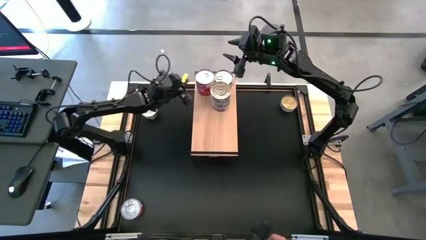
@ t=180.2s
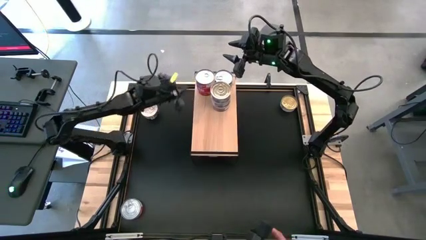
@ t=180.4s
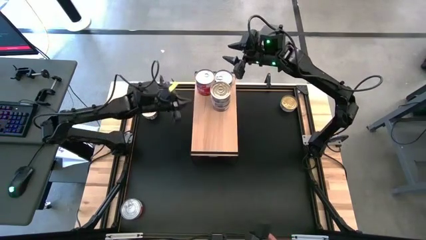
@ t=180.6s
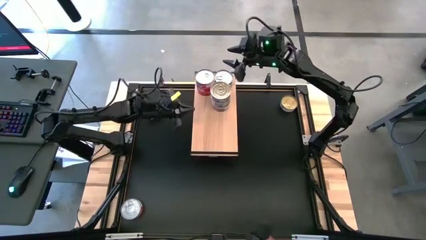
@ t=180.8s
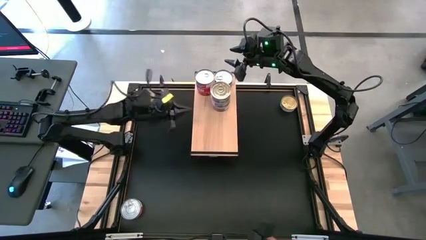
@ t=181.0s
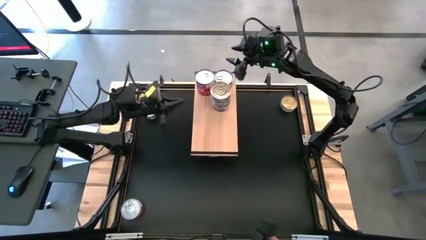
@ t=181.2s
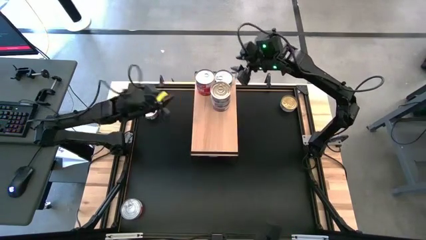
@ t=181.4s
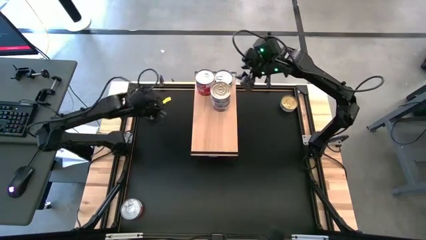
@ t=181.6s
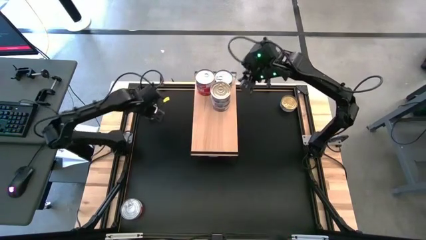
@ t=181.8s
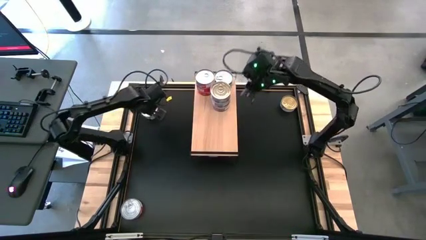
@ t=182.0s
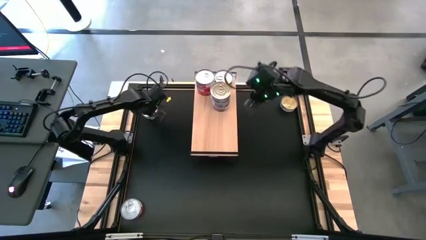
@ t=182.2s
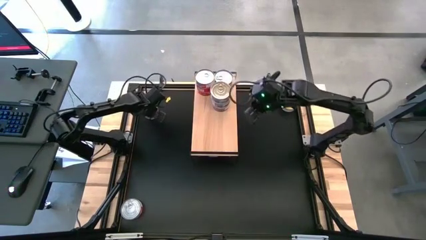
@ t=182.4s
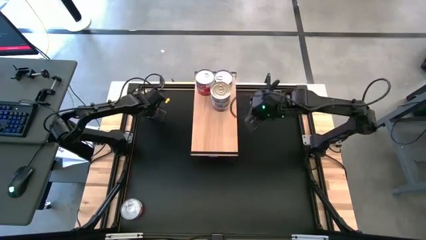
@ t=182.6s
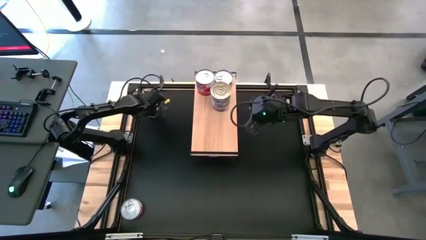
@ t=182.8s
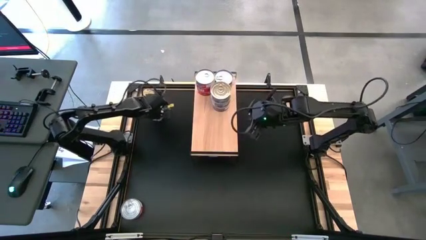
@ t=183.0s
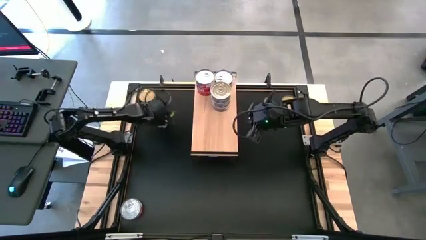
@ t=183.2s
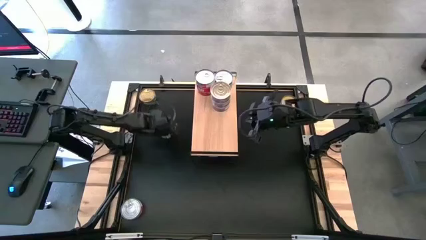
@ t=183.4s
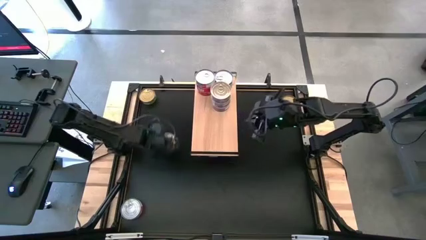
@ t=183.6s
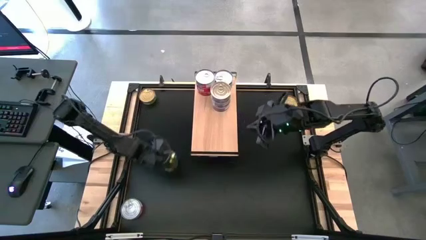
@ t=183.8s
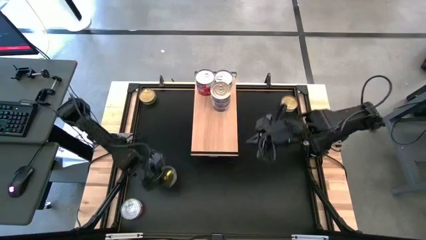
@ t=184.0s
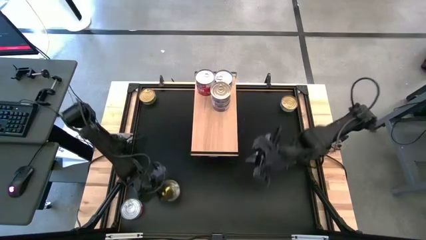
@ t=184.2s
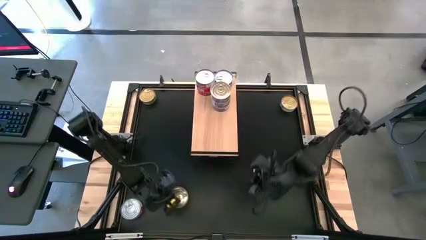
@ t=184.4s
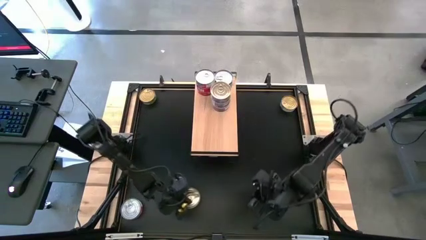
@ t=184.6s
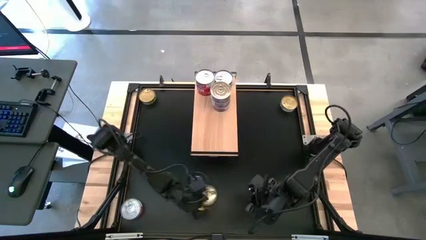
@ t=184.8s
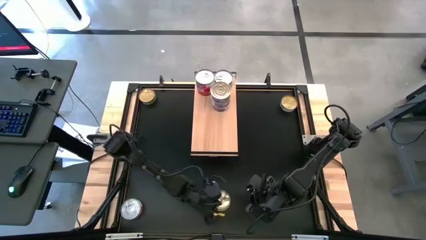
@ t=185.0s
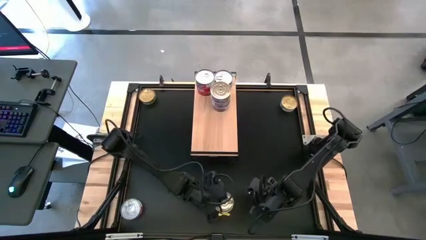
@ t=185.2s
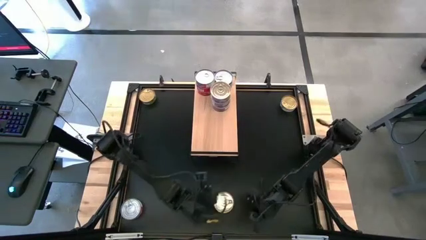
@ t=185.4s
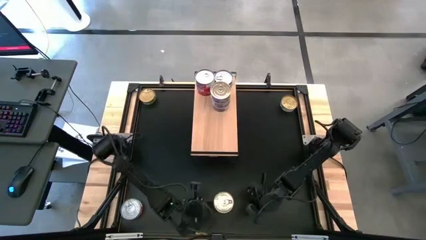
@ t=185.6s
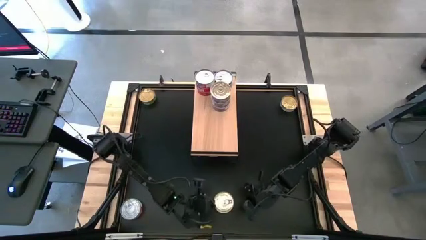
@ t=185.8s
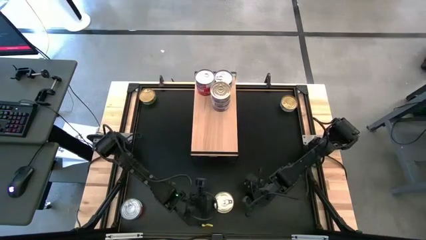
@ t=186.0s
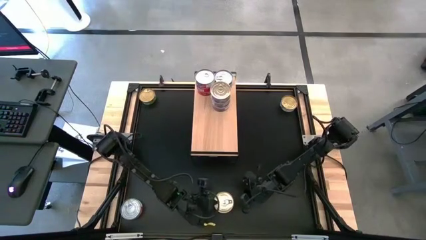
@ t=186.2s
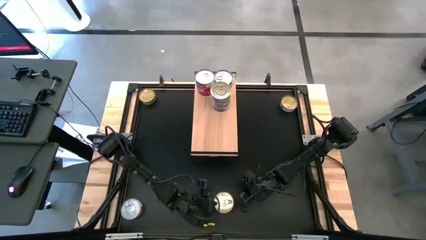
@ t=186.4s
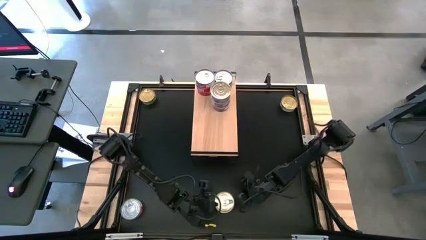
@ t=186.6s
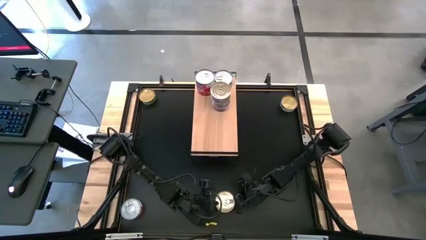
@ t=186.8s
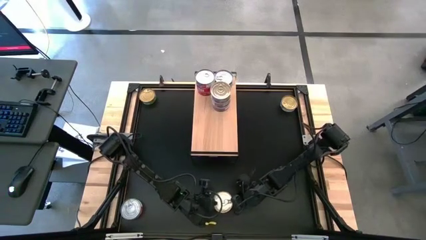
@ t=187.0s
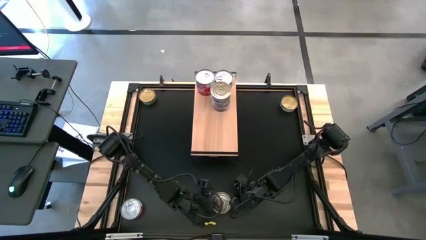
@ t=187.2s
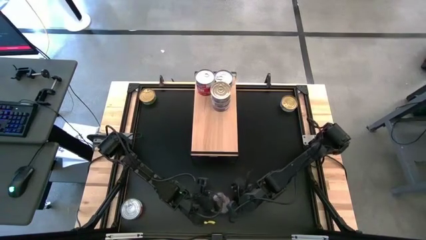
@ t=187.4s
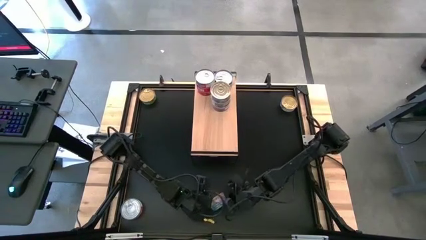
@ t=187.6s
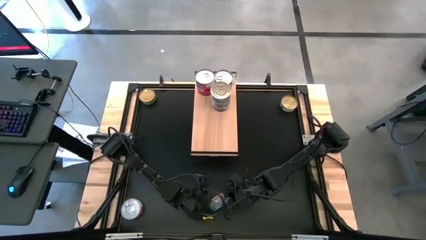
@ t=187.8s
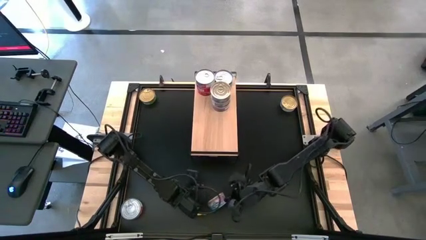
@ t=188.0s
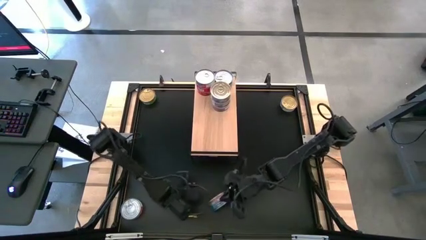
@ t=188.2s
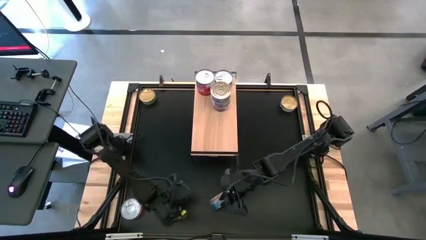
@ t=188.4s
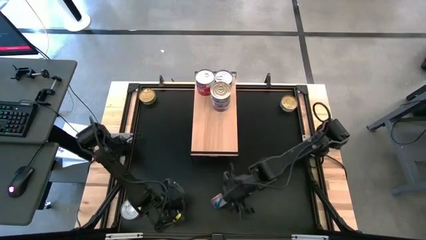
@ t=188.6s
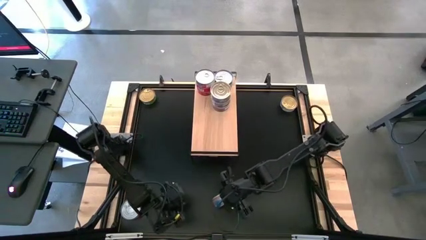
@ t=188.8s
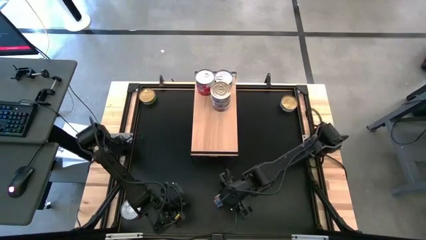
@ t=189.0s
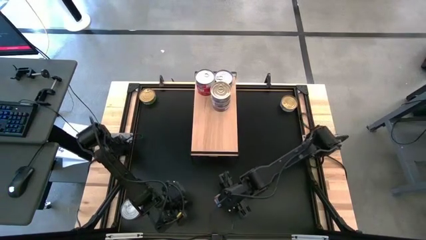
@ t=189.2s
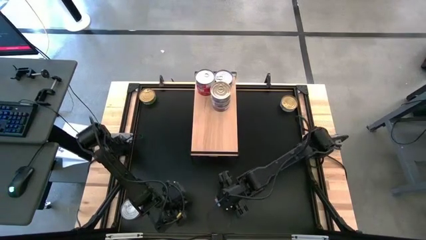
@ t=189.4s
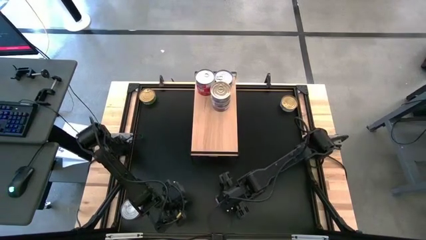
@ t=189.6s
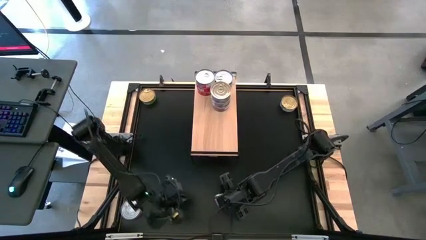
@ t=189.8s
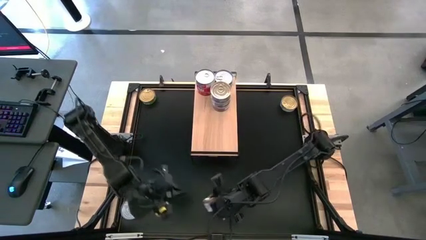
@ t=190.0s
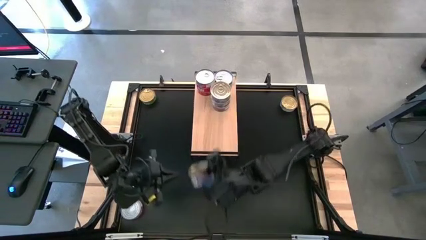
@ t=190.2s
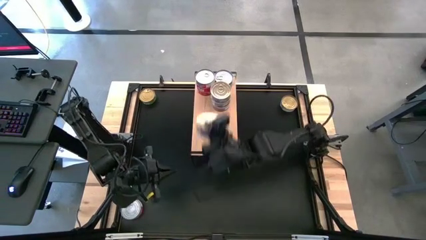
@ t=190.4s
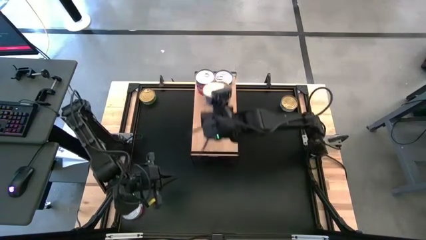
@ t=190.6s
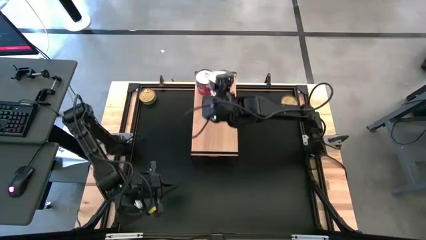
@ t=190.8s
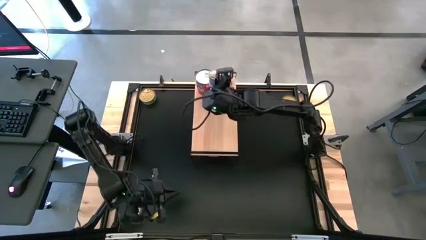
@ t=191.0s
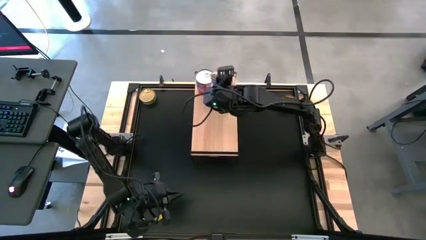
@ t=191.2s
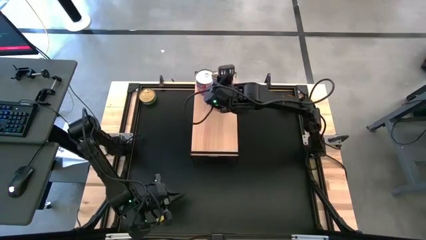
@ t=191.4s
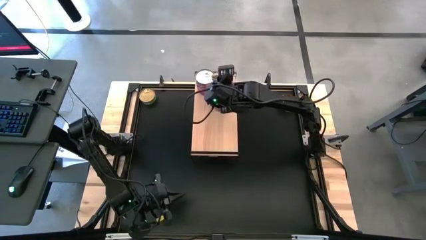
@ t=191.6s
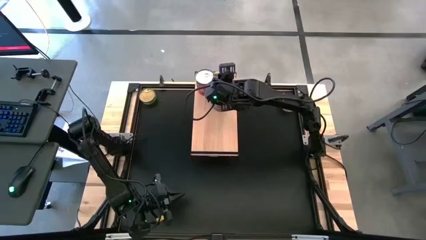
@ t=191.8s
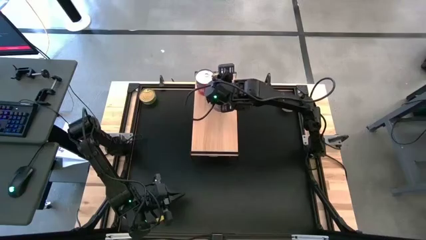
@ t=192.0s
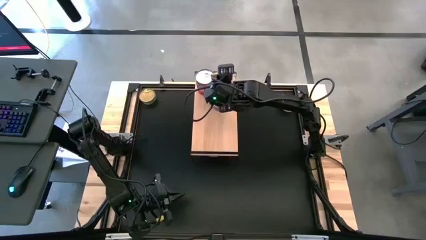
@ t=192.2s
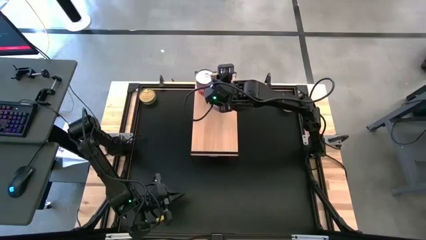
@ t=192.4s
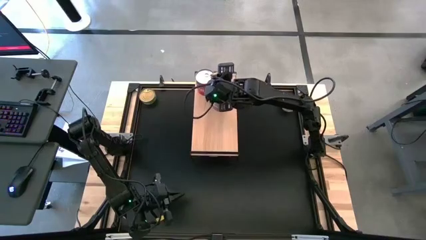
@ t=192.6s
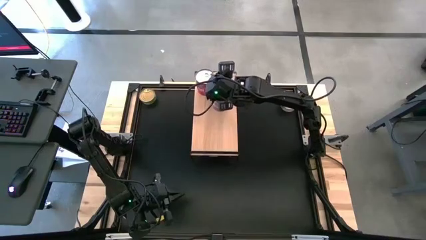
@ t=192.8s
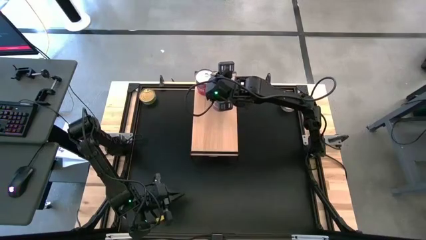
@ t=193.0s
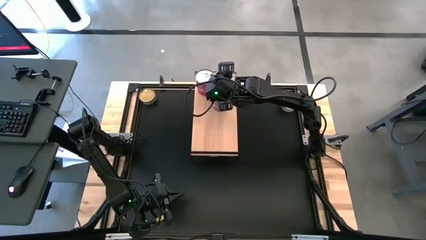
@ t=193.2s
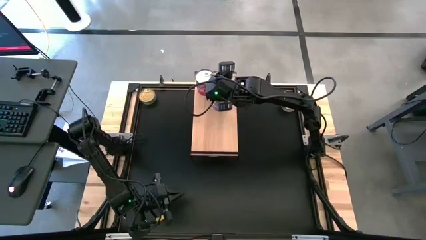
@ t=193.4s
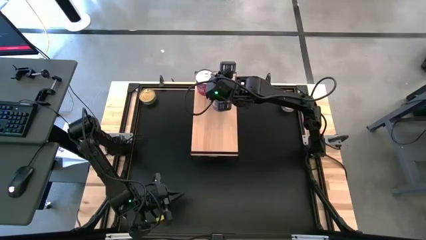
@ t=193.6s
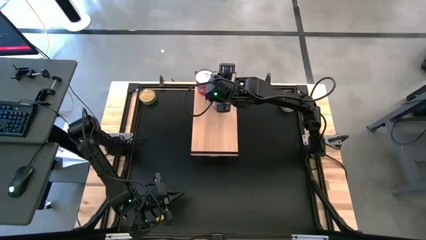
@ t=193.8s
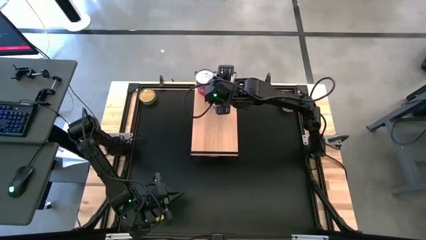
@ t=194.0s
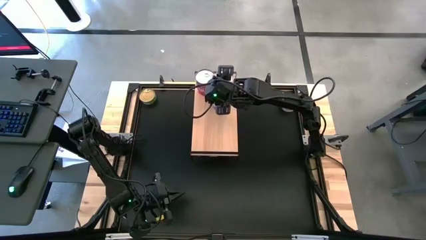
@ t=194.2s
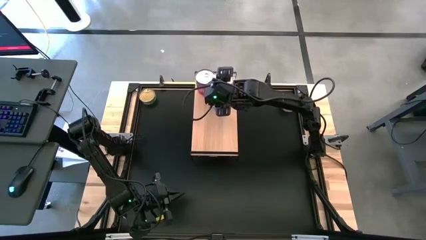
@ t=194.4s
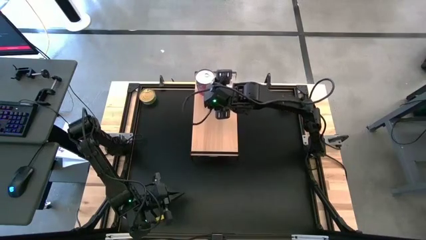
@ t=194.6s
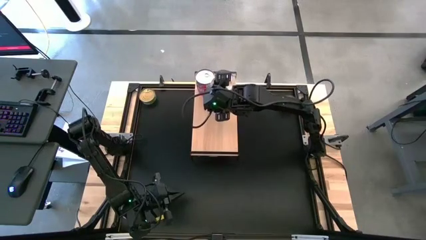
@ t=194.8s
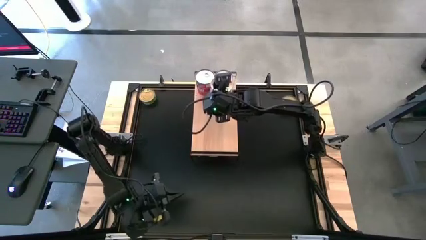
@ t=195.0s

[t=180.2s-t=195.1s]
Task: Stack canned seafood by type on shelf
Stack the blue pink tuna can on top of the blue pink tuna can on the shelf
